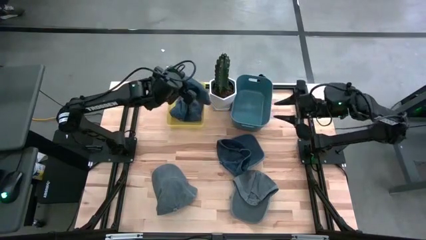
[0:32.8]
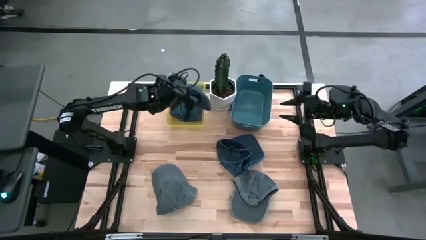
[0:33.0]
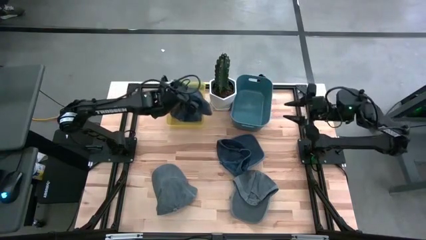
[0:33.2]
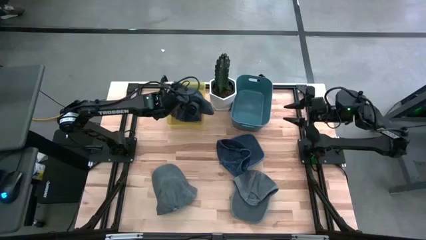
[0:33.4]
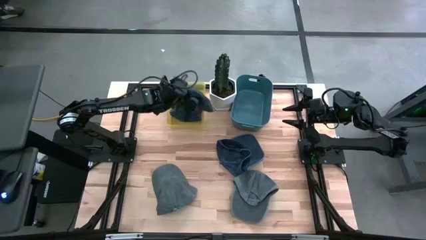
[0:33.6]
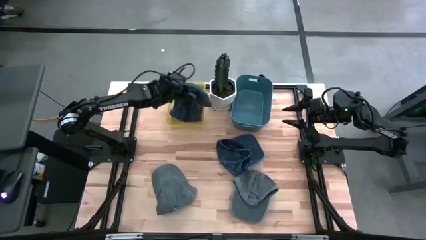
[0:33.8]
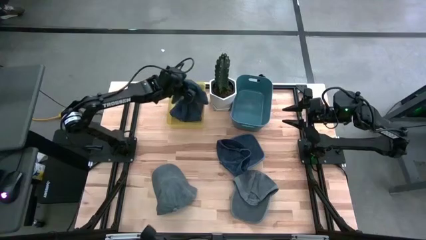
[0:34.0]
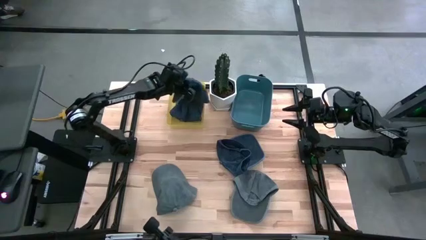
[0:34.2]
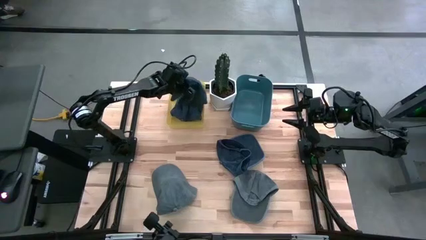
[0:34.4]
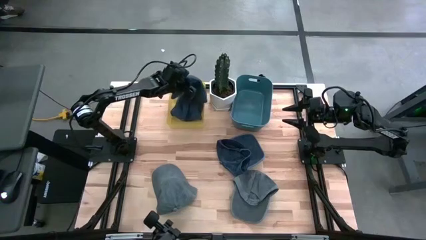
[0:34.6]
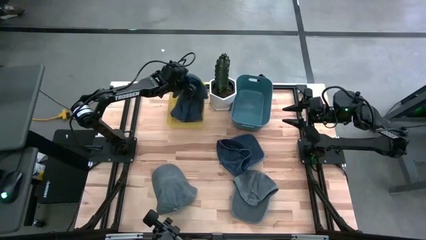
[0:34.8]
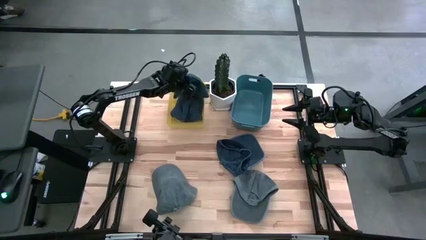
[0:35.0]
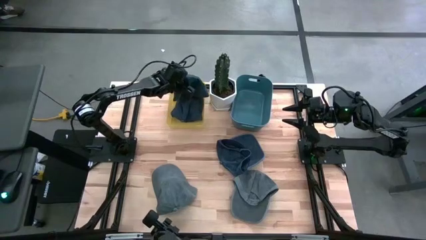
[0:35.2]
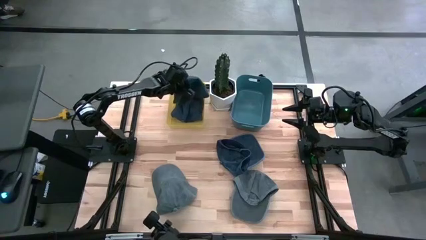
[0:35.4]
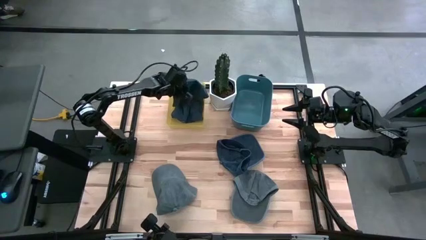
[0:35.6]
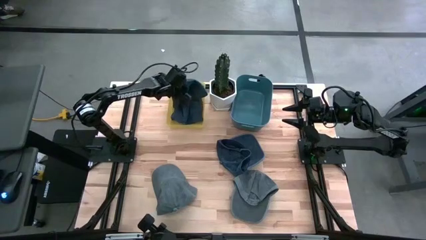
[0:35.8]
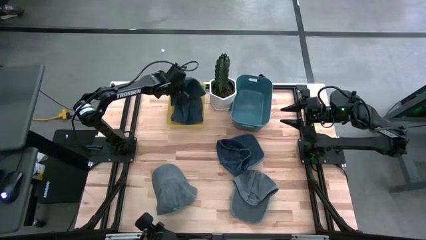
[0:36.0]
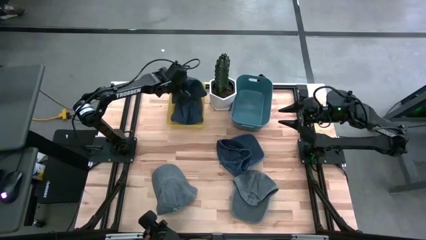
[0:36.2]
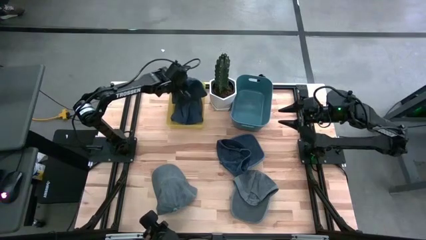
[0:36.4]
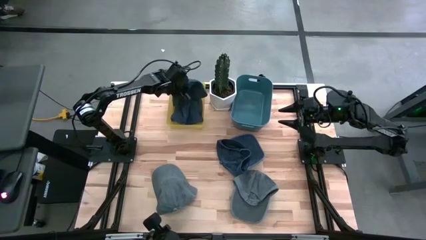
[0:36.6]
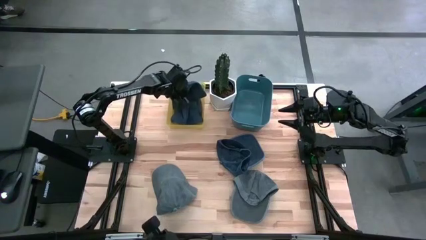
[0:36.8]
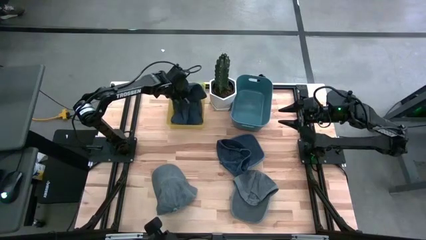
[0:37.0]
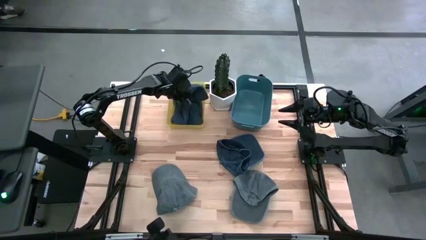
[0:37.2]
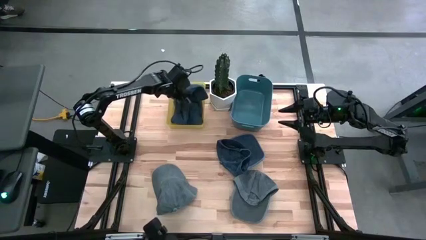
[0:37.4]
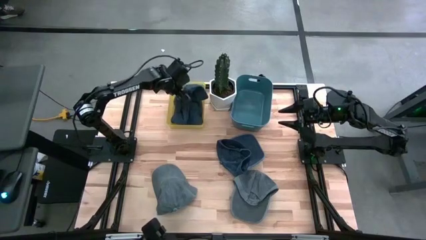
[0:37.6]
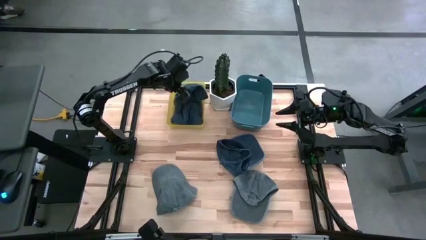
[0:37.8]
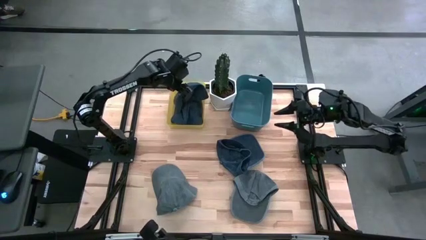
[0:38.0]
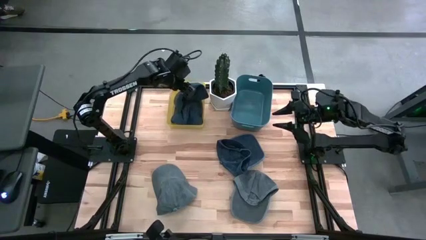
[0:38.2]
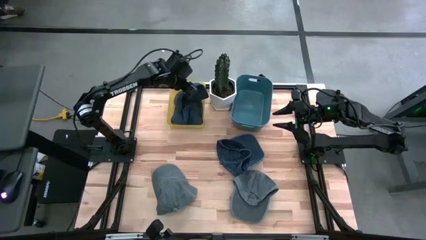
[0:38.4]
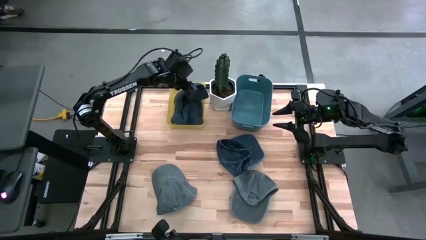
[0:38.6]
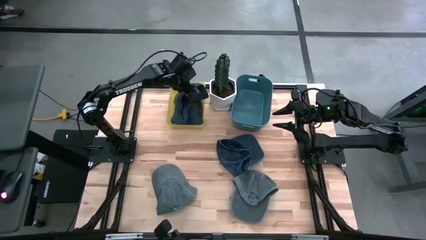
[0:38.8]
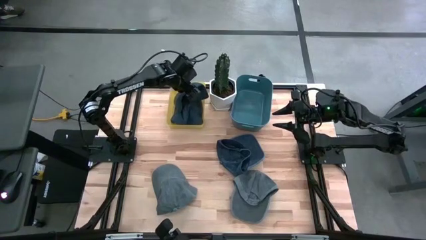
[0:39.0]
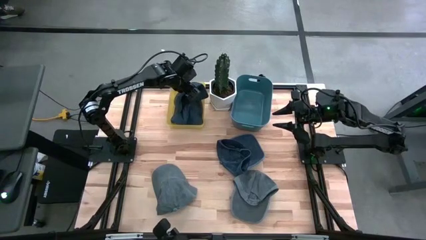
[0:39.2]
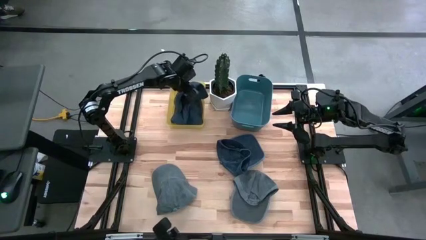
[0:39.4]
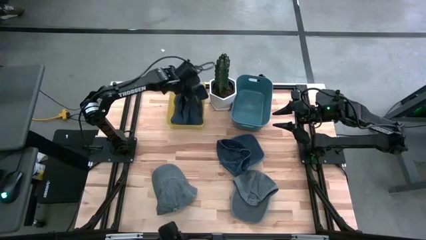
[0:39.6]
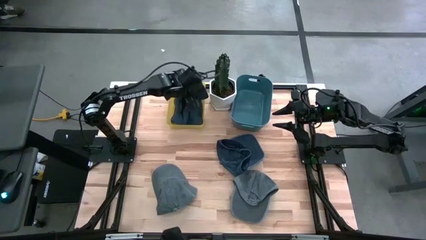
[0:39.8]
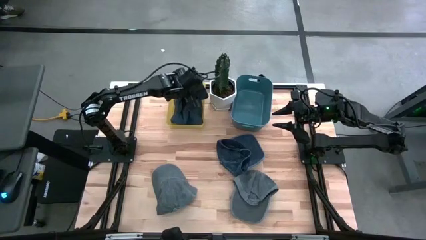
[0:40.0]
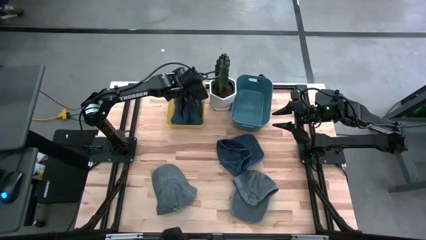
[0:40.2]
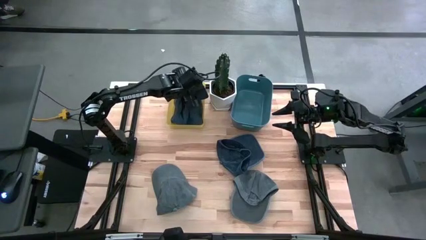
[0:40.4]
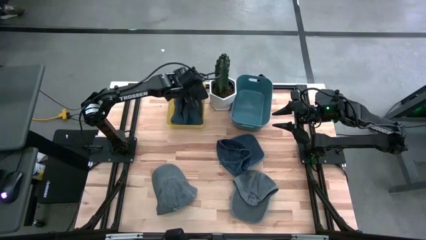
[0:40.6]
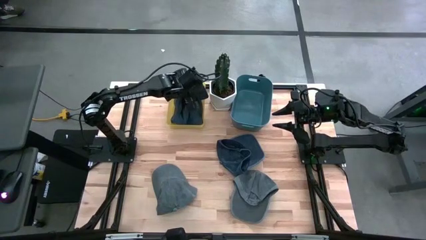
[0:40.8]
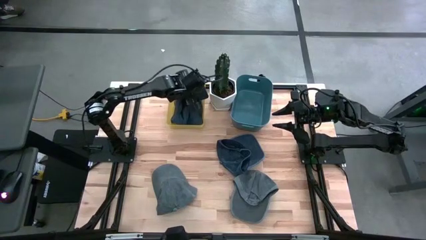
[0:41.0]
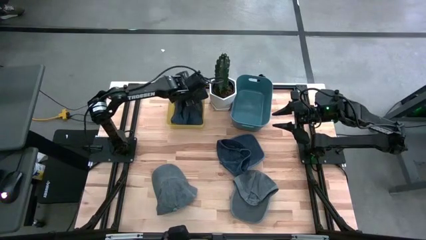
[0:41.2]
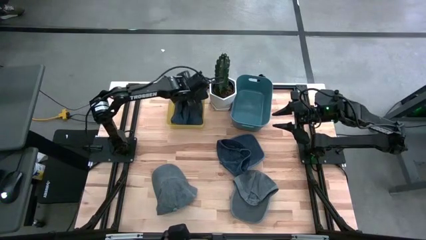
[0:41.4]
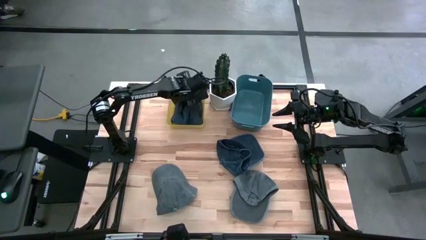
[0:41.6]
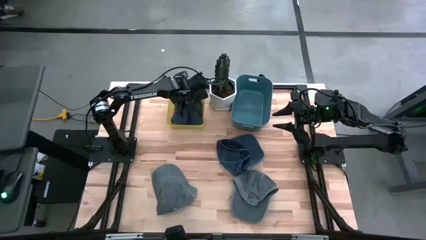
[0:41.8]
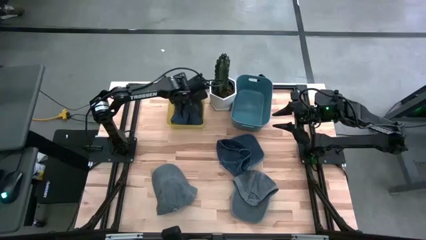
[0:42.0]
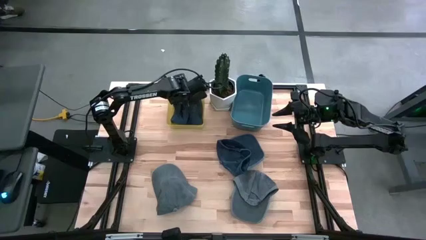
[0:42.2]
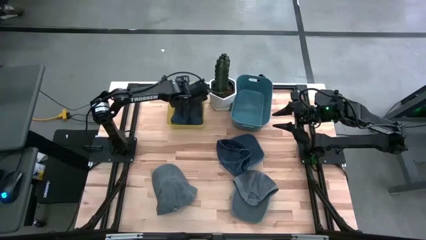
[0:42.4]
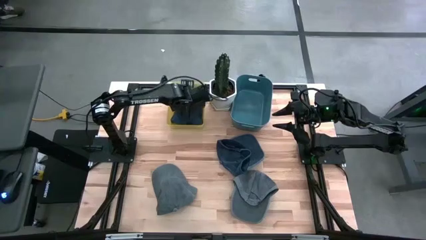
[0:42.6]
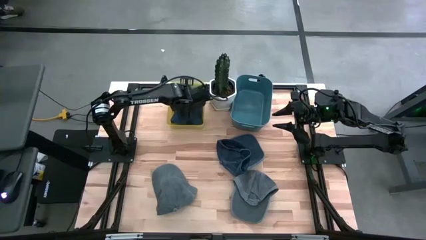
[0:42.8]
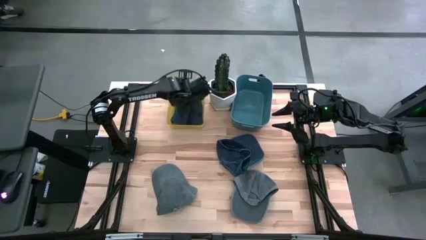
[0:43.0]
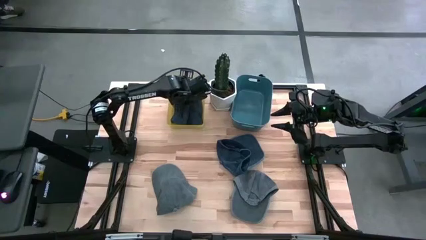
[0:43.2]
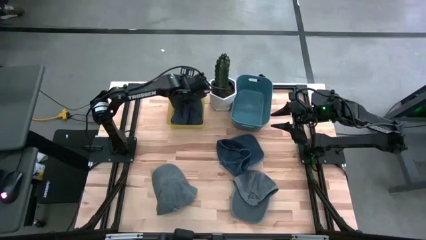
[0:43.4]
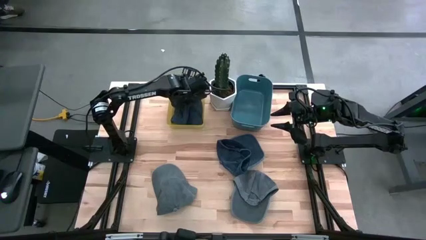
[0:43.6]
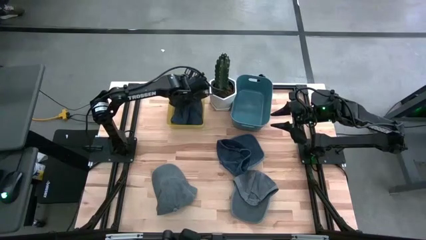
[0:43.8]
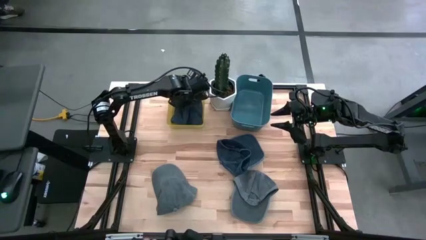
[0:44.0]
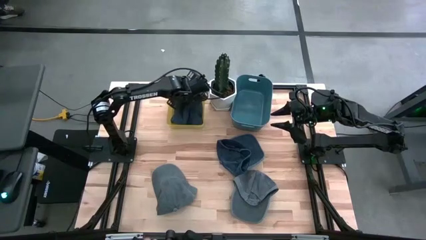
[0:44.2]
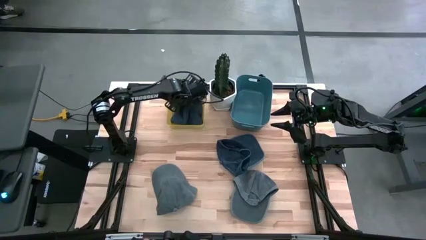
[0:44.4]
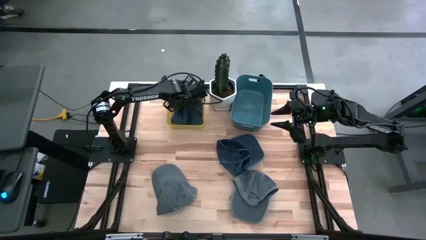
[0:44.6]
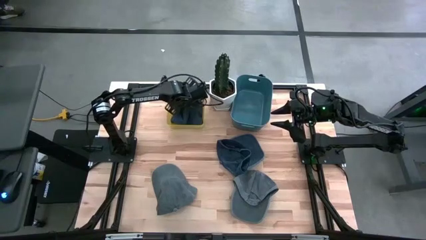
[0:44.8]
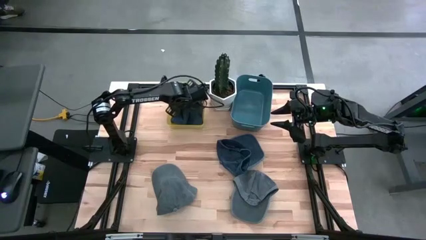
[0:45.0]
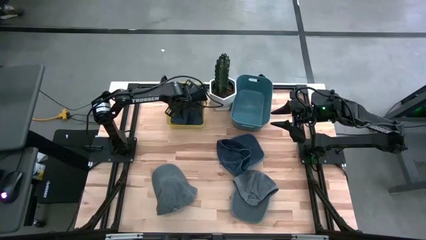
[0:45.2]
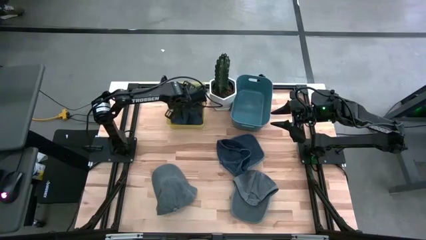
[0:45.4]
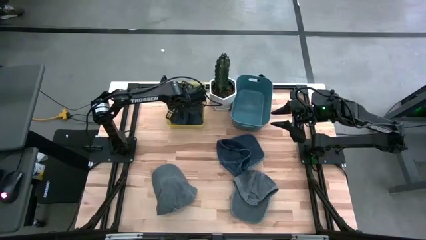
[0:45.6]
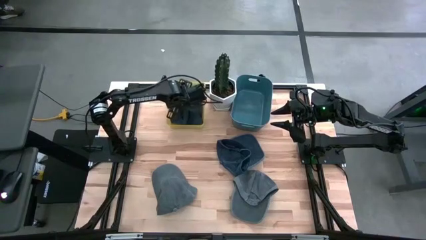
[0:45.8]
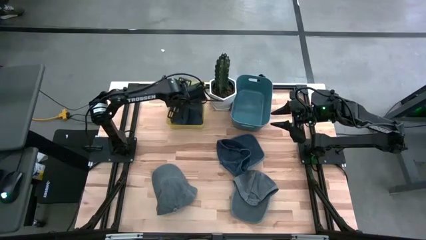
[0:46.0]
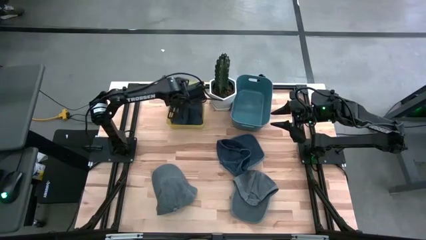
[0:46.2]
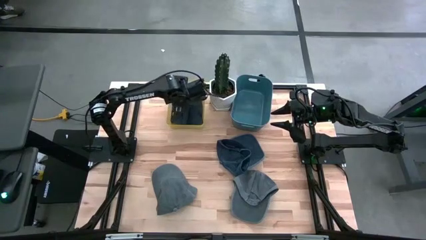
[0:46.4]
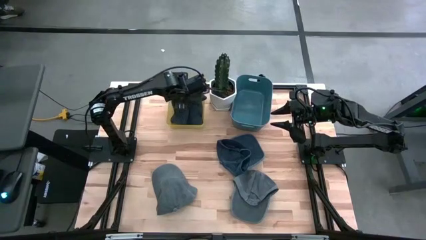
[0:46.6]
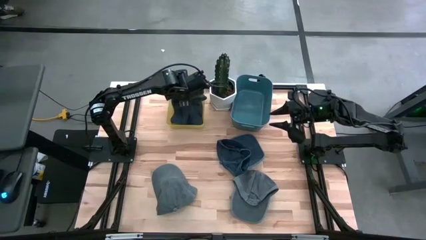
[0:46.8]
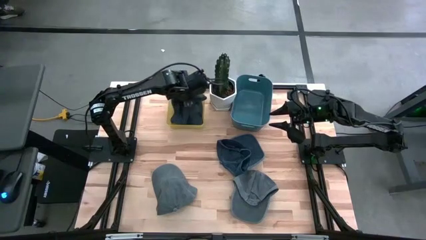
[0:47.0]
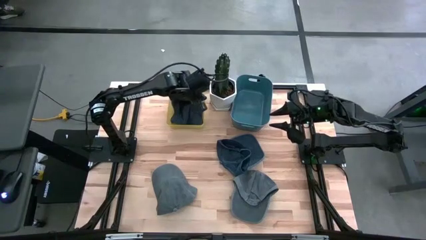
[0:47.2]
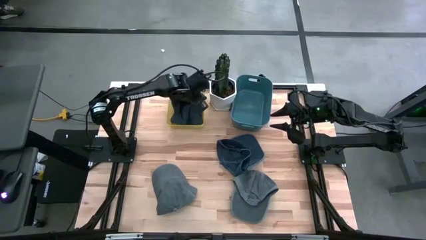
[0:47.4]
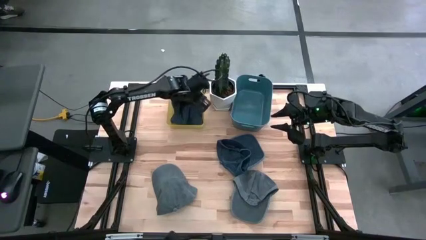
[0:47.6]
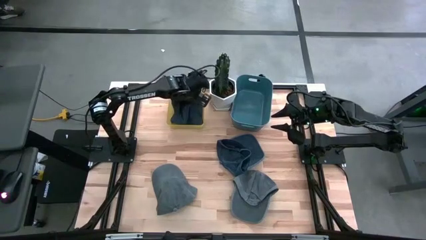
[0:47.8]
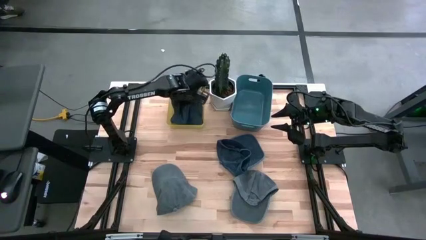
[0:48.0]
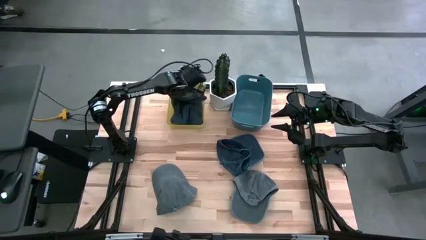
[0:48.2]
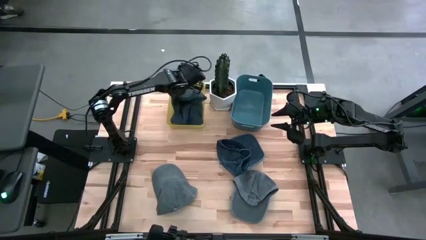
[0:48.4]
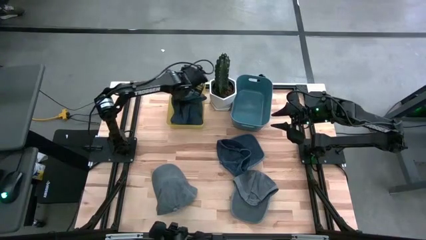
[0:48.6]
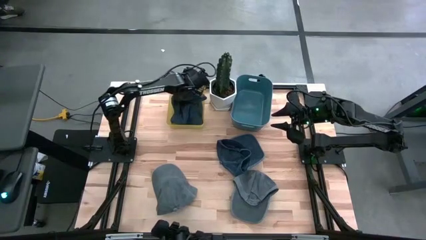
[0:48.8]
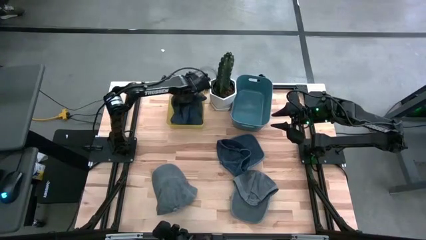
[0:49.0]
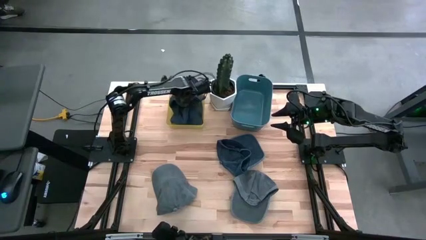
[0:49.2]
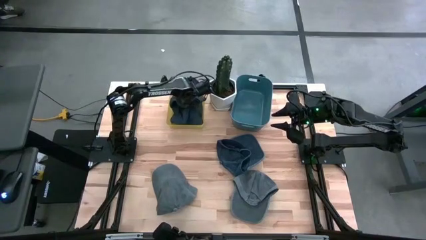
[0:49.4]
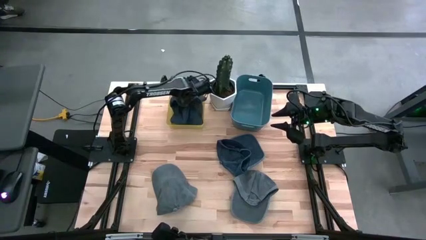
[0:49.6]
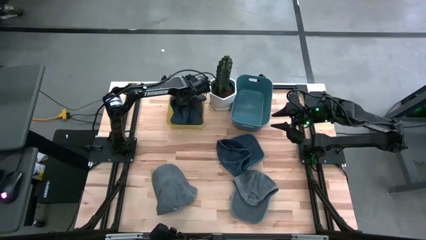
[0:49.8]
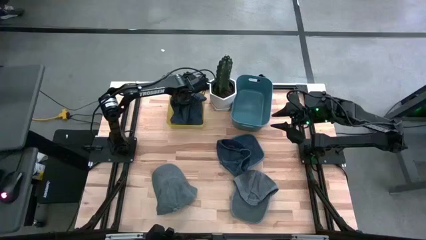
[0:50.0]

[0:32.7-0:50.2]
Task: Pick & Place hat
Put the left blue cap into the yellow bin
